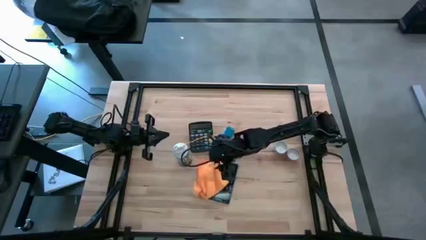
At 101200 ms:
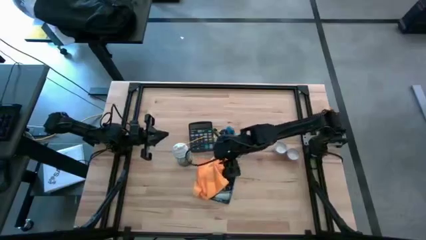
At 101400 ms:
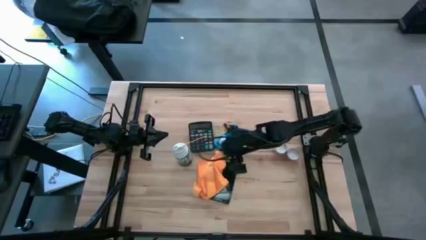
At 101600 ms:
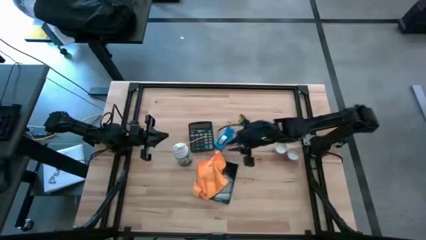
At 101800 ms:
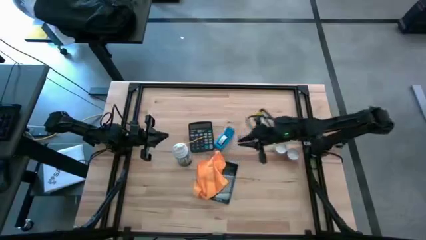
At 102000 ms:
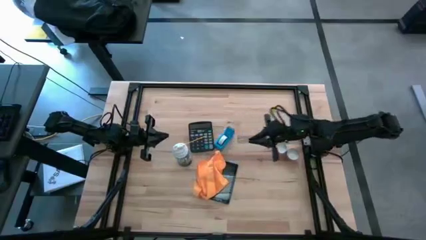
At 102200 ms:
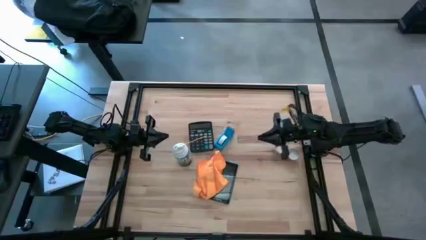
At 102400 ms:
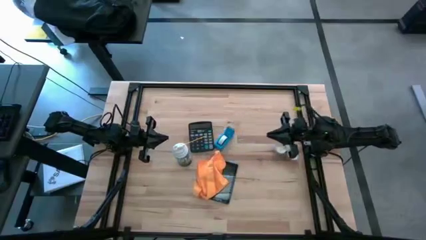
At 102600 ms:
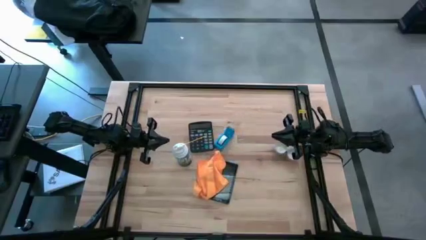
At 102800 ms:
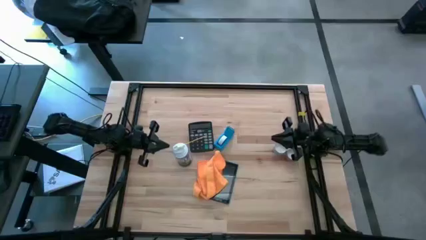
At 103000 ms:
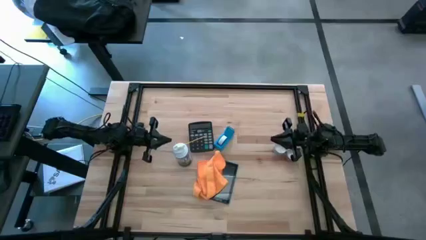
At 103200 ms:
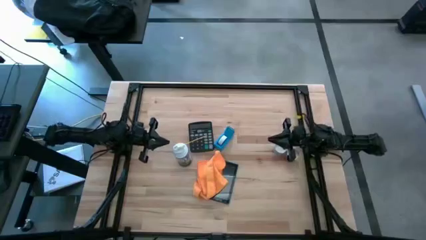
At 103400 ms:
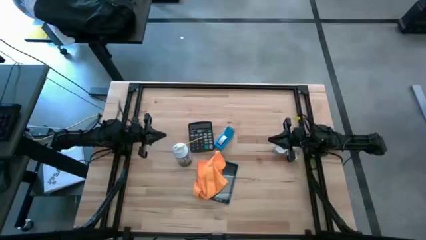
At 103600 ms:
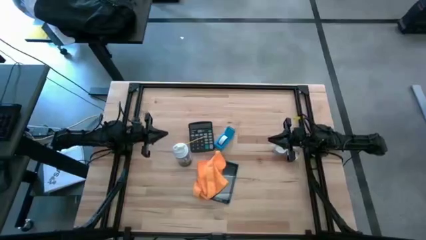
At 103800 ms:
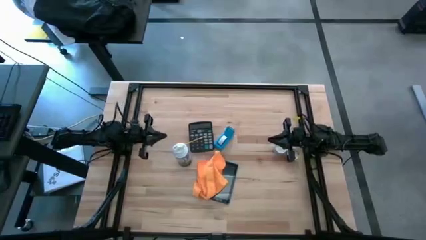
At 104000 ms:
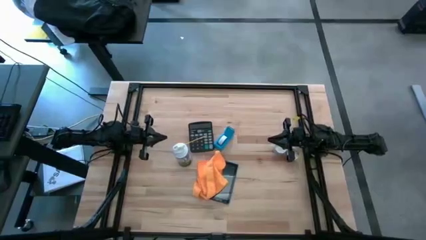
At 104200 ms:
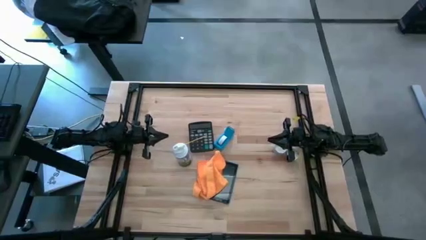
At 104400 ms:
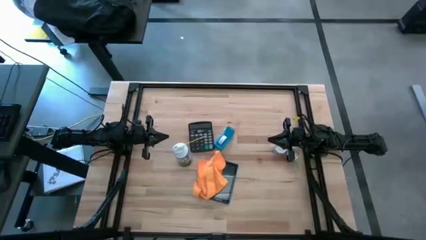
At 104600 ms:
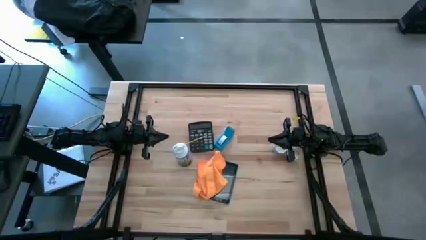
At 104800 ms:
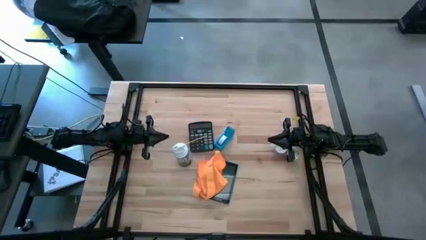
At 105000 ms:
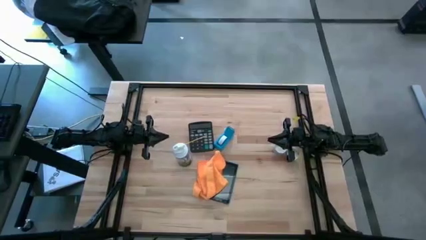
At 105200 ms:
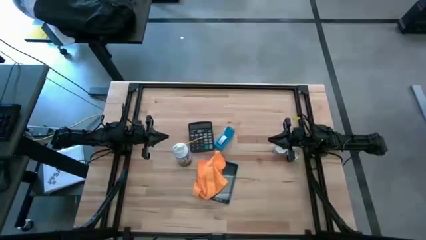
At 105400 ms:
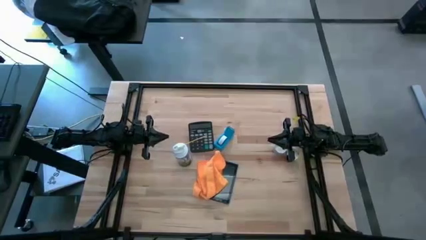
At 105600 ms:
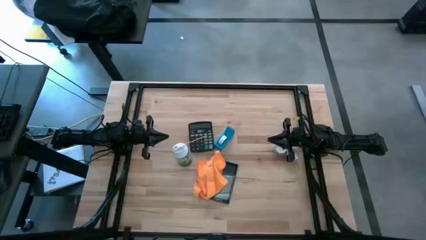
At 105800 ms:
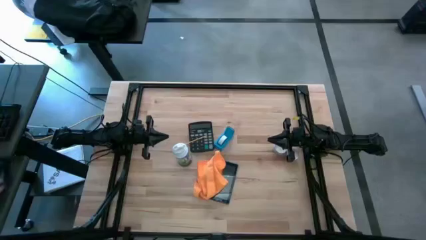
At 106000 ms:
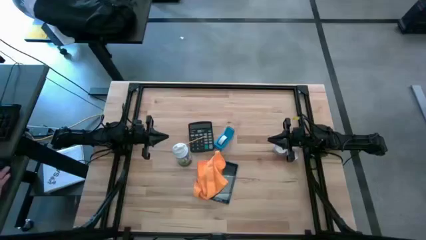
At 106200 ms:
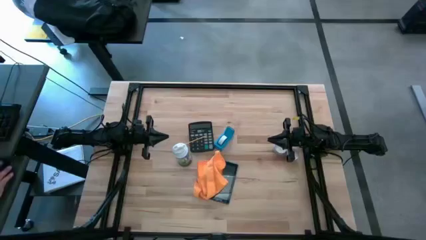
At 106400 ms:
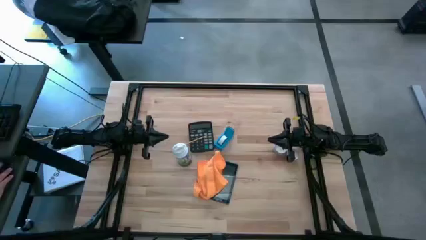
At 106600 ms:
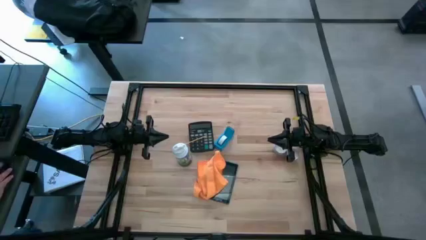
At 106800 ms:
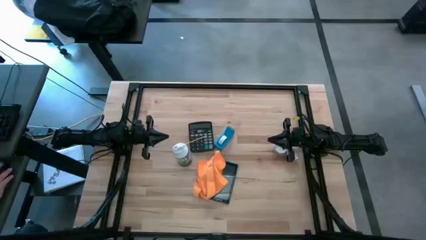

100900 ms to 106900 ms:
Task: Apply microfiber cloth
Return to Home Position

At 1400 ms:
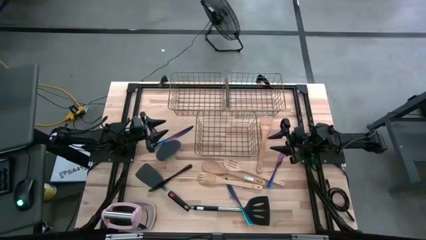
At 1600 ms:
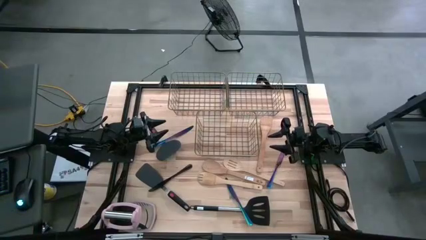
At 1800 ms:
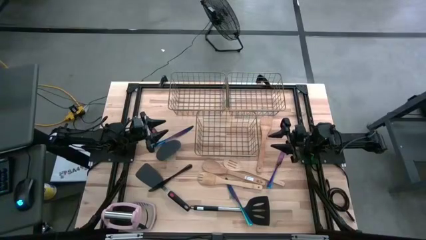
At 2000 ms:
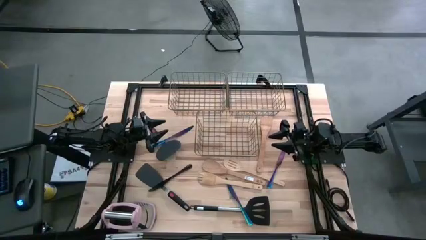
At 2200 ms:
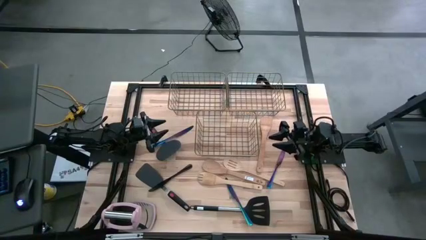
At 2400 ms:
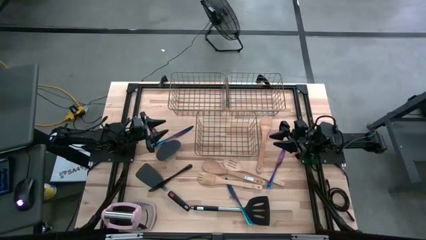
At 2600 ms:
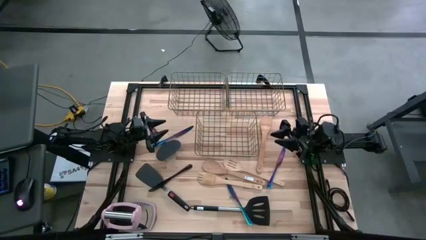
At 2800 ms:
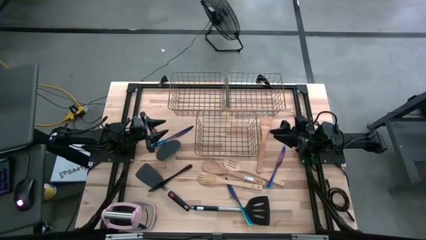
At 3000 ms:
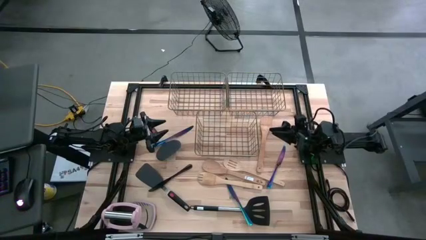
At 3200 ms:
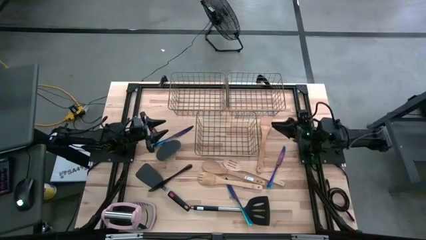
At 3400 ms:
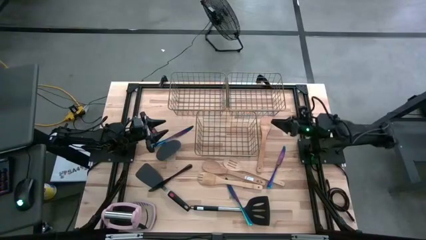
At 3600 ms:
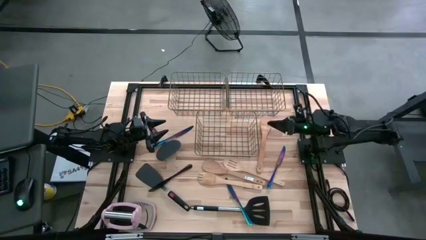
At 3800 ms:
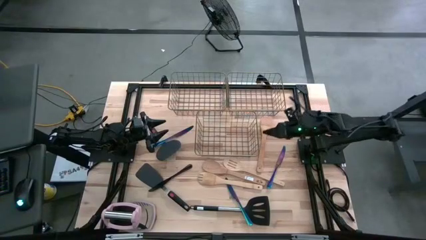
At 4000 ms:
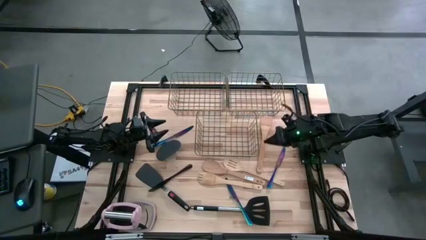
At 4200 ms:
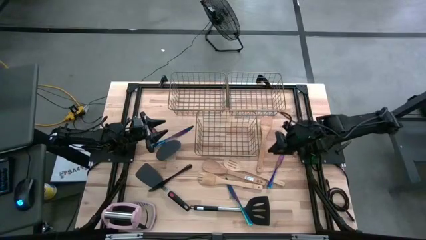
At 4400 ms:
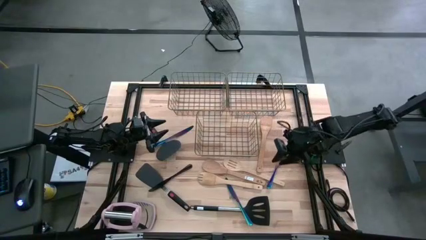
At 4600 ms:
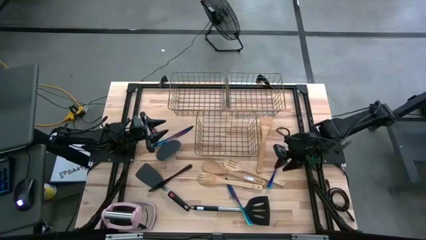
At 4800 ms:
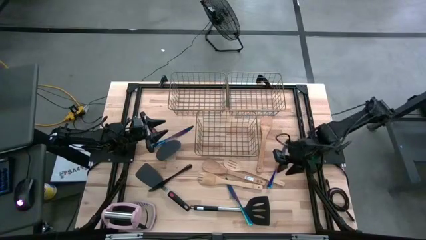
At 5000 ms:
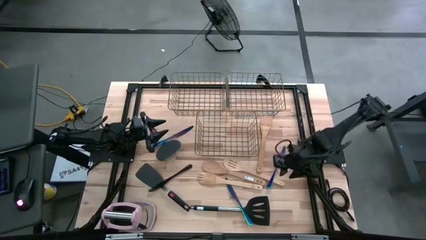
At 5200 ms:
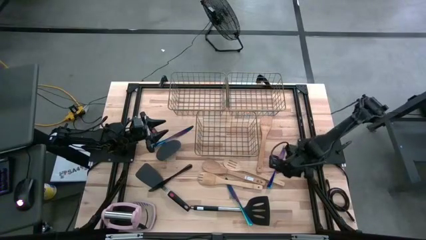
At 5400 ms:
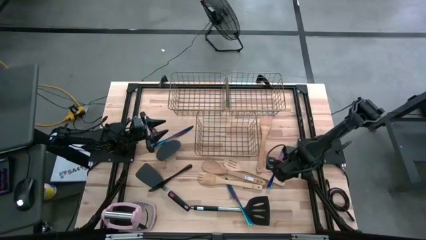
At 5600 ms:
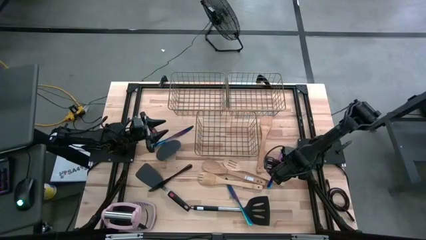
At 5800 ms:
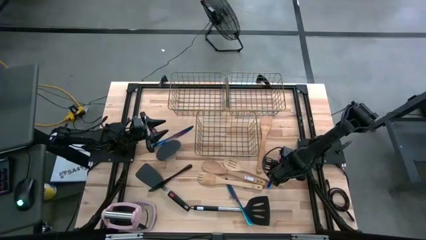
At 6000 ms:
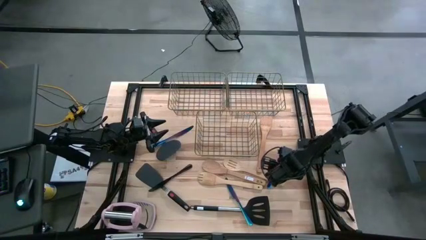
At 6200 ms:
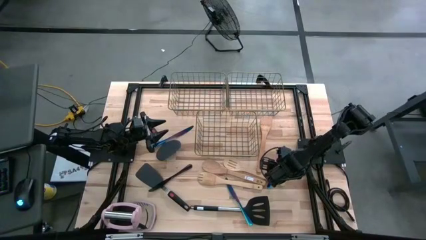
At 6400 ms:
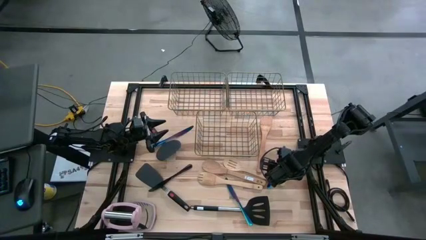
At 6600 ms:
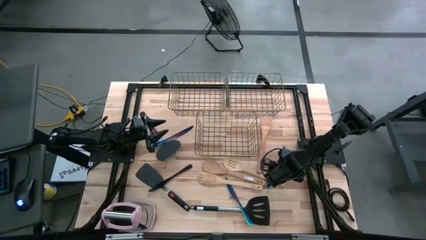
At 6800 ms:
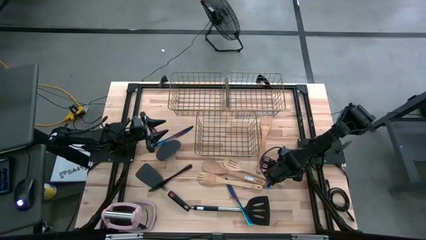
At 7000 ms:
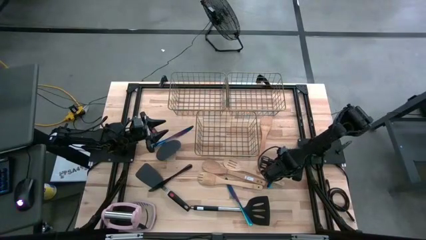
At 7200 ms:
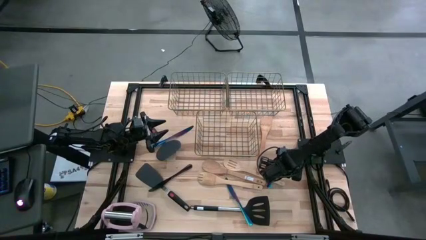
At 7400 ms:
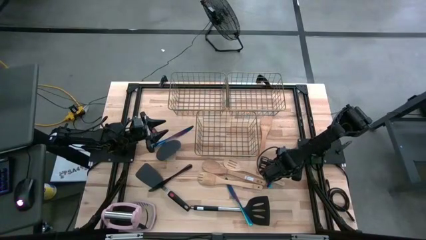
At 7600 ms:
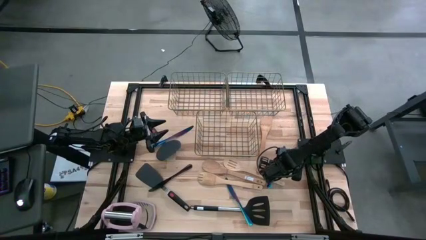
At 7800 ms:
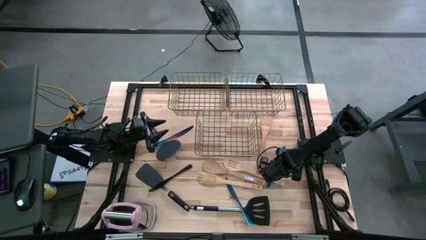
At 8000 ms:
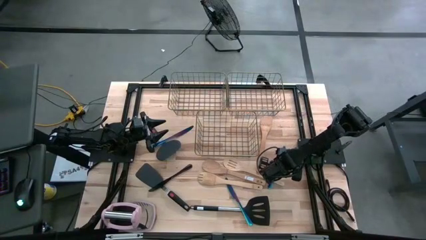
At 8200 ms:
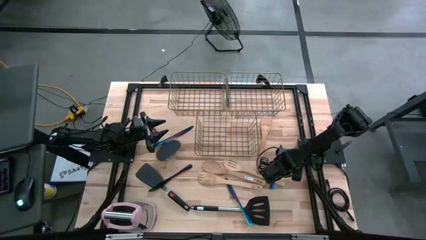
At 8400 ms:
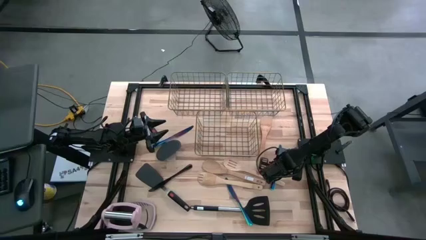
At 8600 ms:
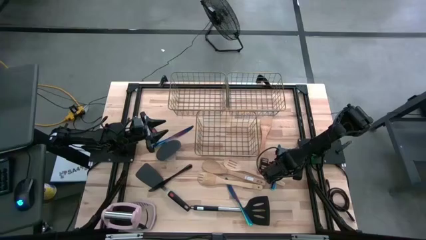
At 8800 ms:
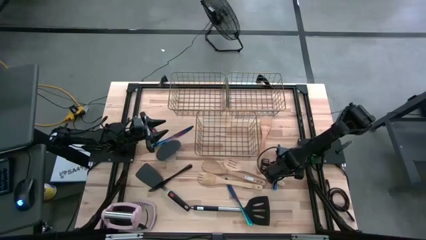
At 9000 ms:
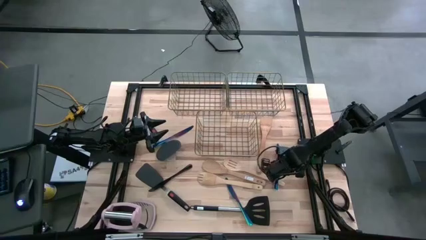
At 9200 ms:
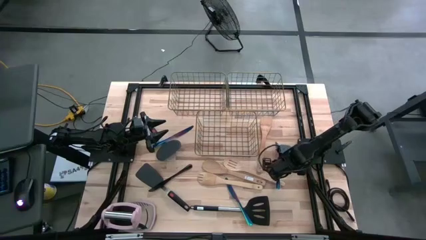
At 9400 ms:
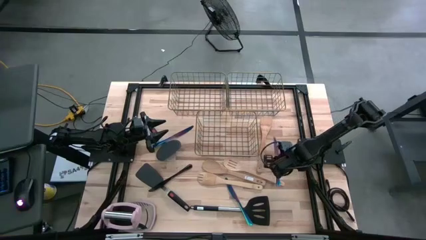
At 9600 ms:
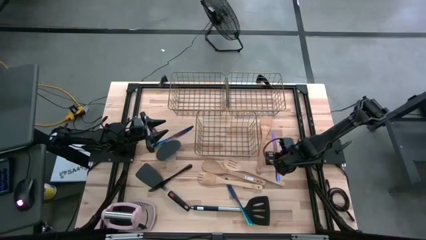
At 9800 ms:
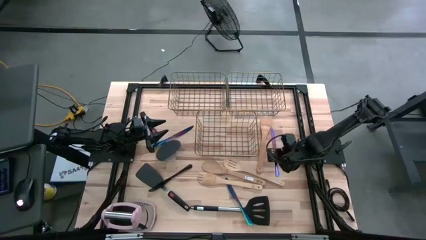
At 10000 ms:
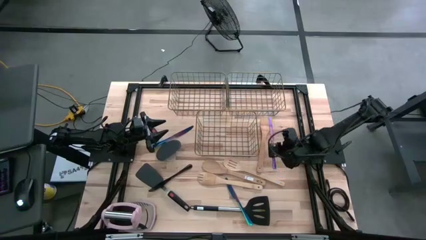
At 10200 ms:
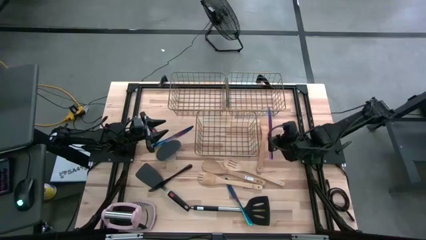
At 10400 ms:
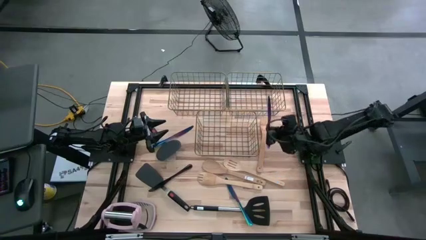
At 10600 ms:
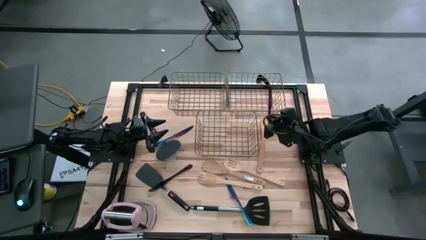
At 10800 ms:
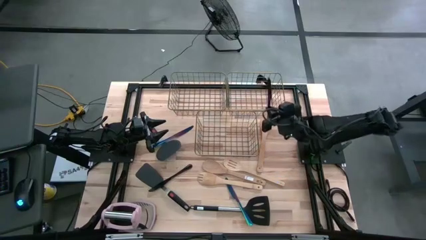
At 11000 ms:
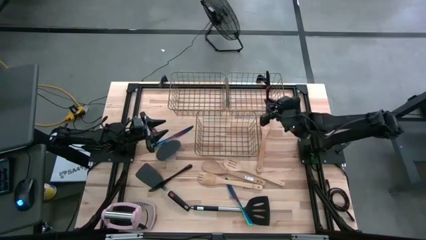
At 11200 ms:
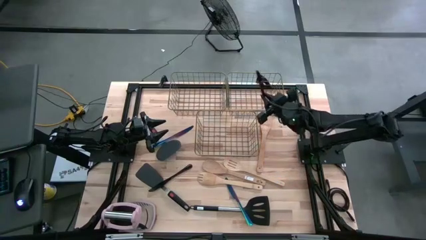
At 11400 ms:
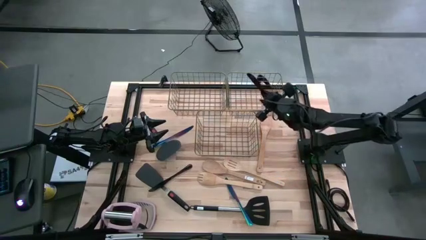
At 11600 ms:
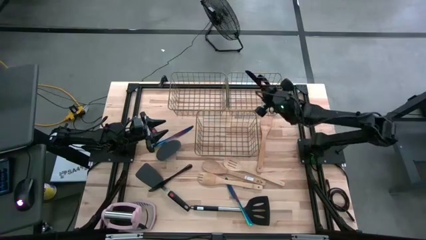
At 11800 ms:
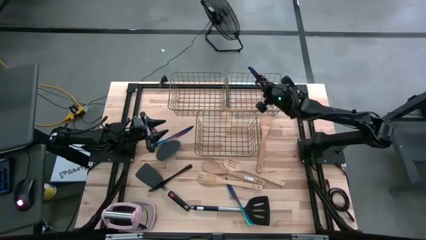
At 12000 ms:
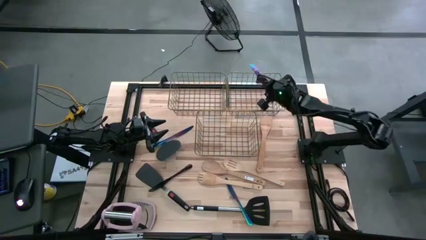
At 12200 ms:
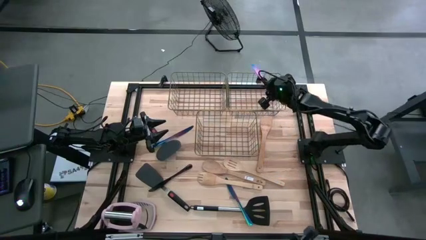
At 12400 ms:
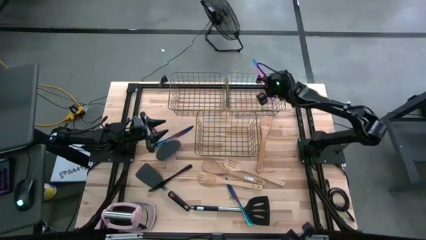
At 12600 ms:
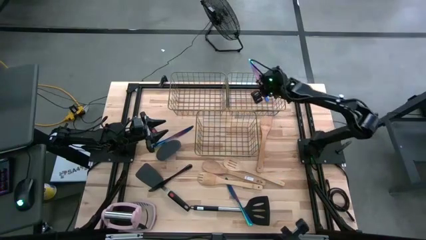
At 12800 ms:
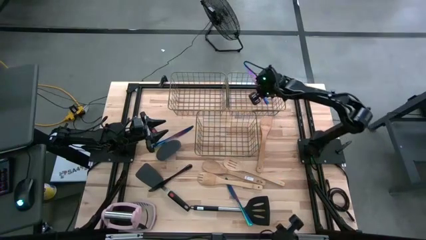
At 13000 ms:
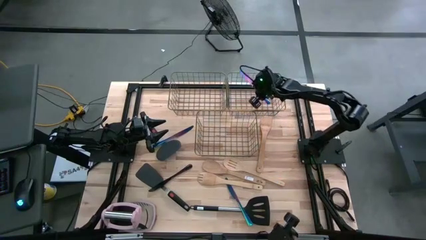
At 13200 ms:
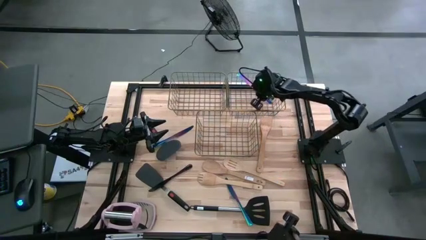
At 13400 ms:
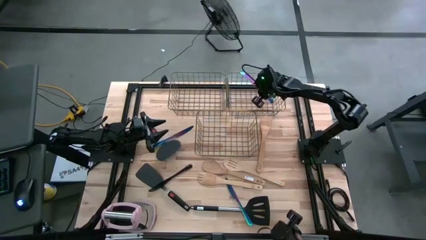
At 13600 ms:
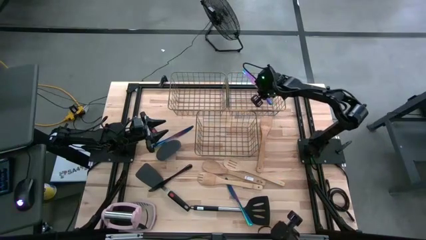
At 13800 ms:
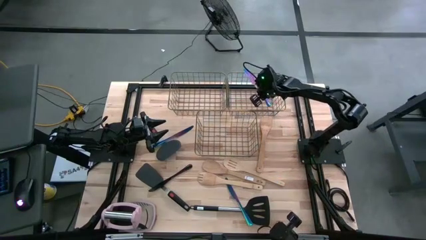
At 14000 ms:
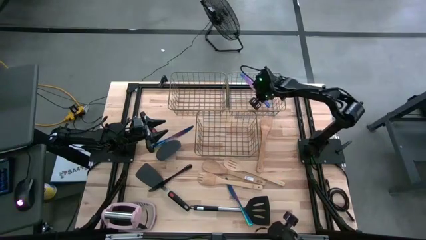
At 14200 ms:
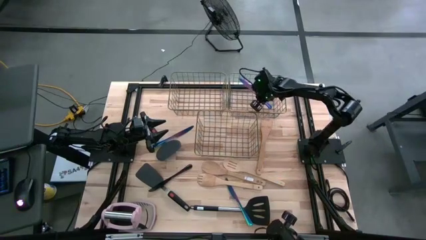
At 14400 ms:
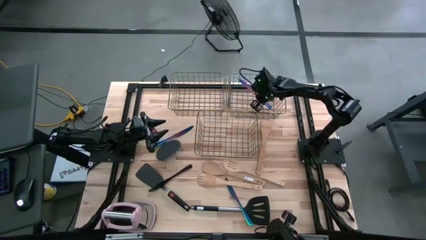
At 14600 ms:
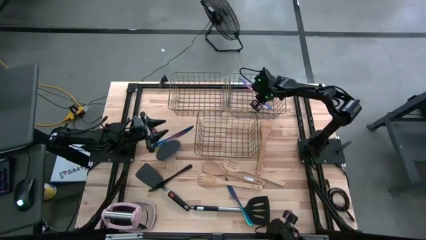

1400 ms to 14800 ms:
Task: Pick & Place Kitchen Items
Put the blue table knife into the top right wire basket
